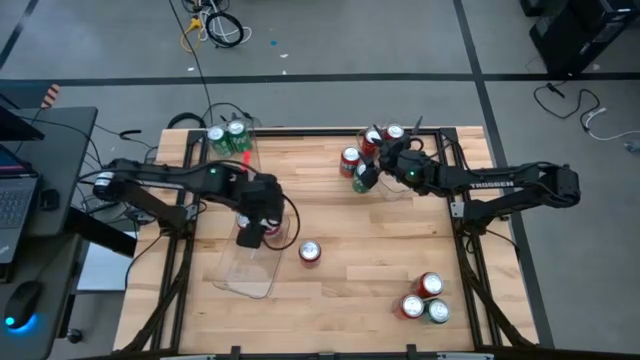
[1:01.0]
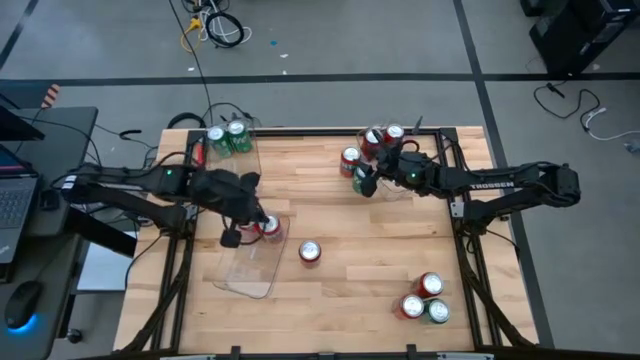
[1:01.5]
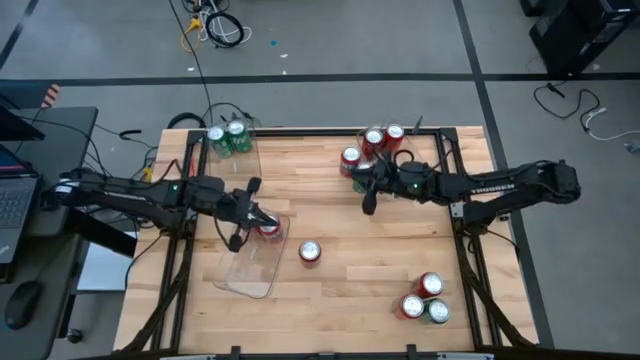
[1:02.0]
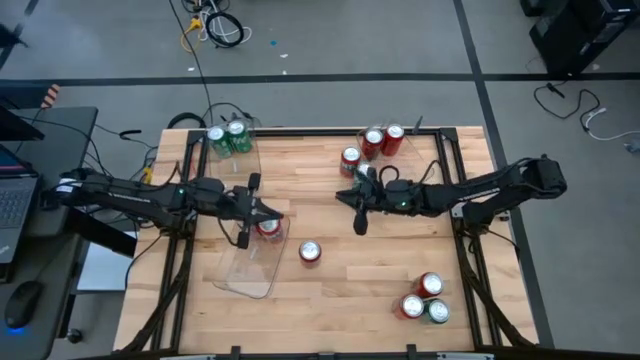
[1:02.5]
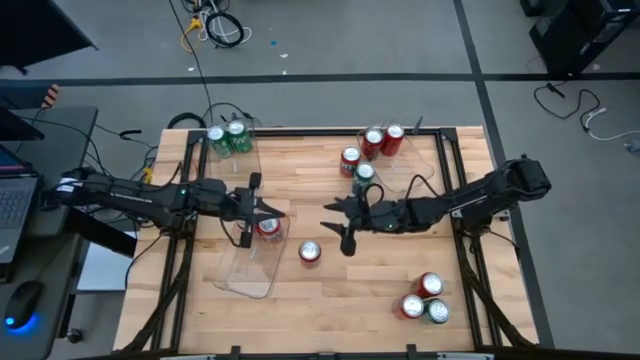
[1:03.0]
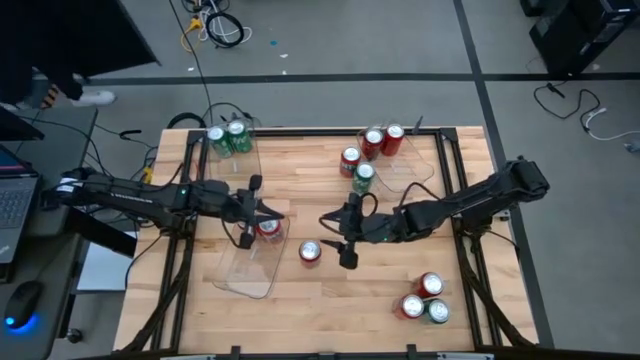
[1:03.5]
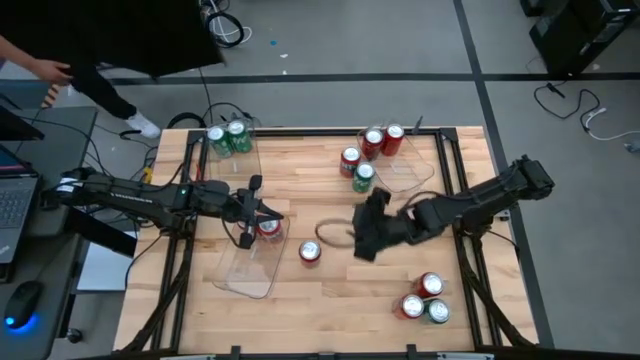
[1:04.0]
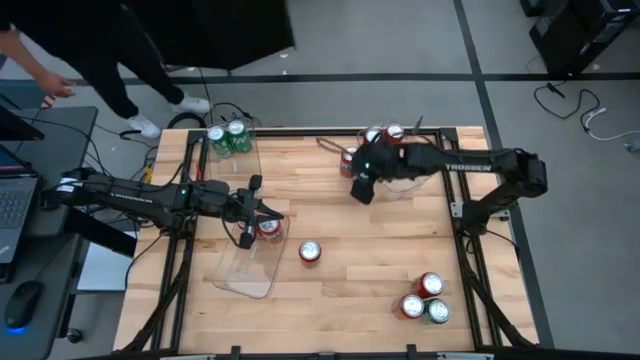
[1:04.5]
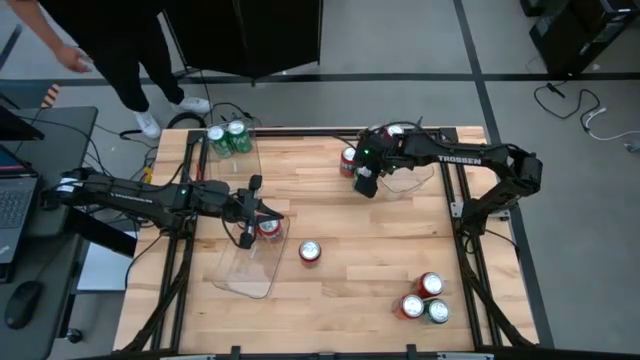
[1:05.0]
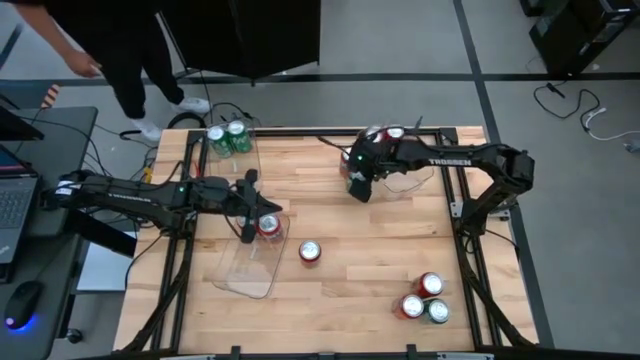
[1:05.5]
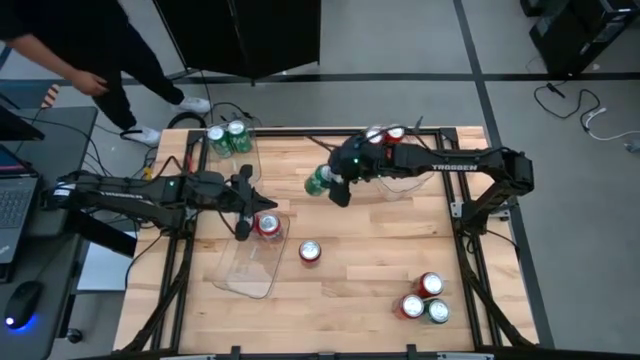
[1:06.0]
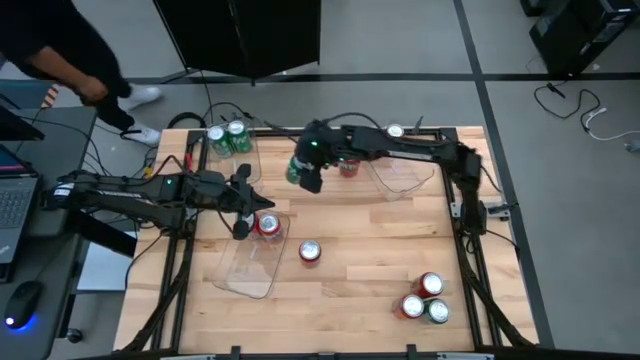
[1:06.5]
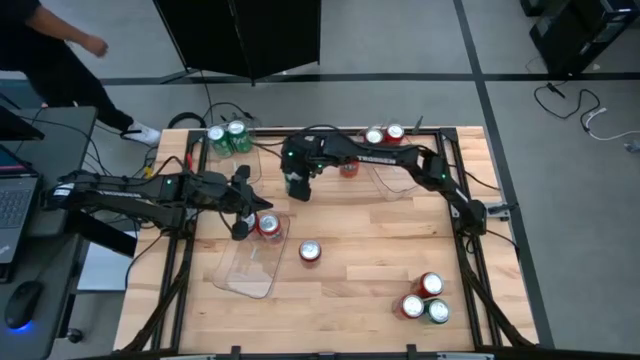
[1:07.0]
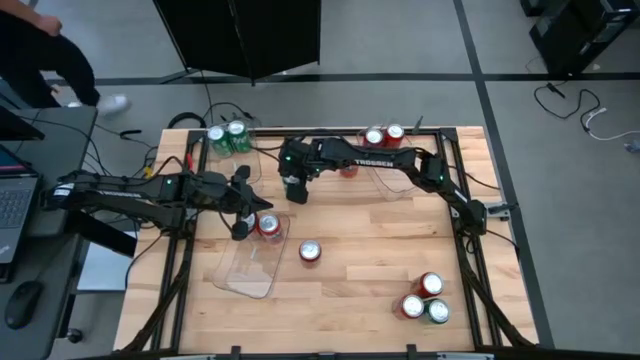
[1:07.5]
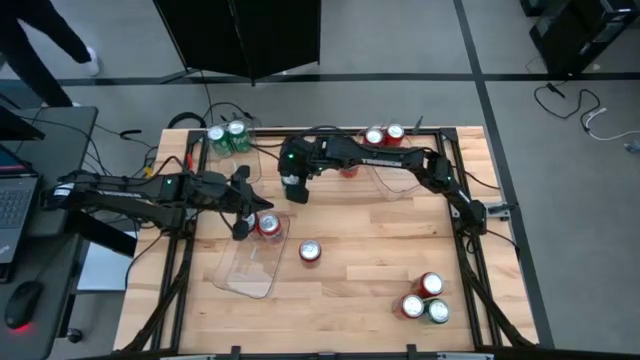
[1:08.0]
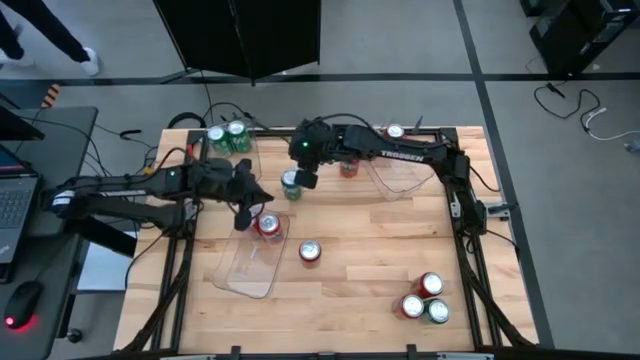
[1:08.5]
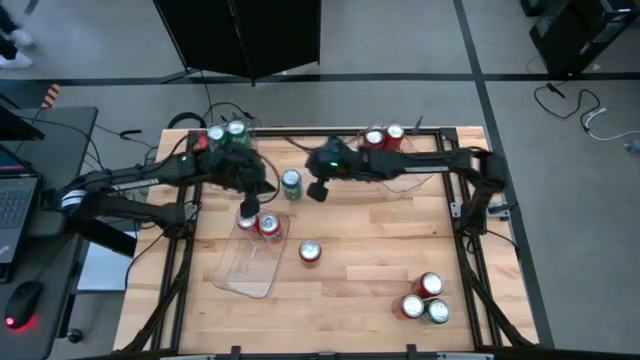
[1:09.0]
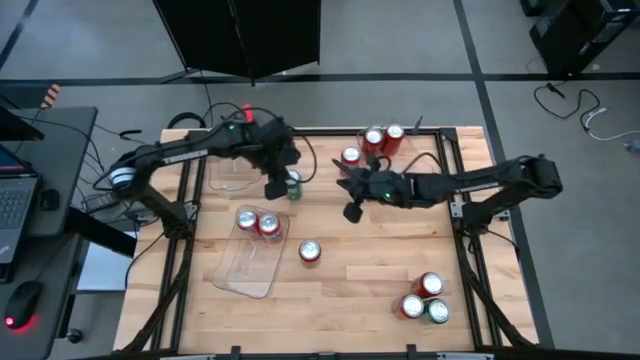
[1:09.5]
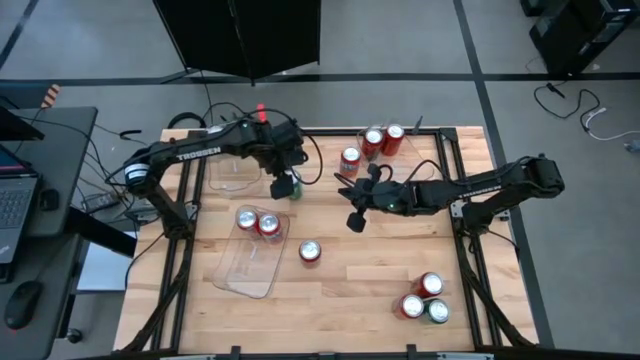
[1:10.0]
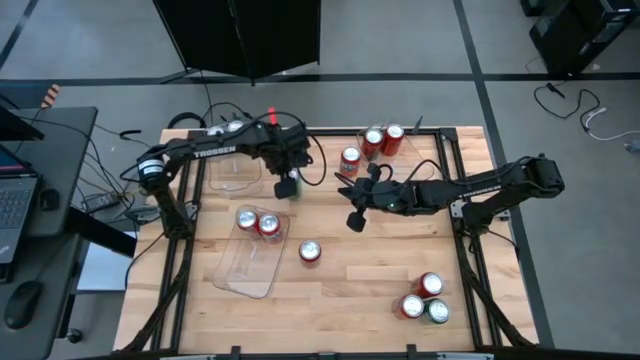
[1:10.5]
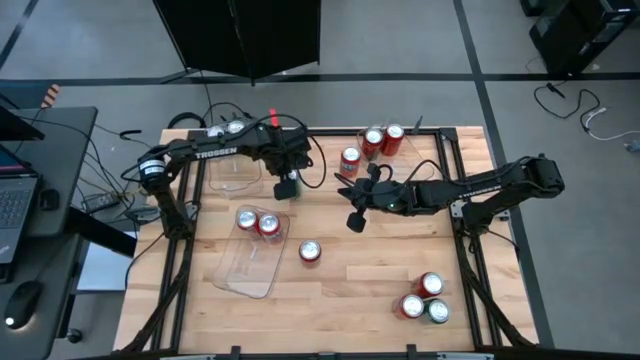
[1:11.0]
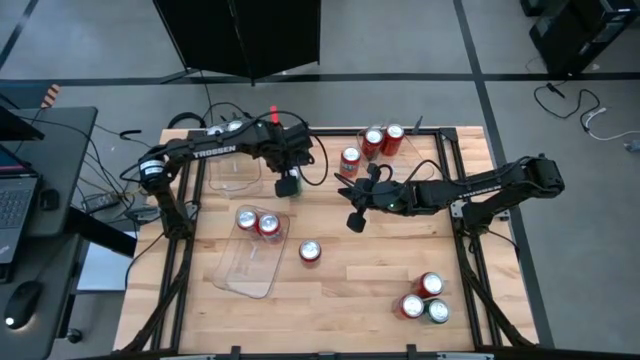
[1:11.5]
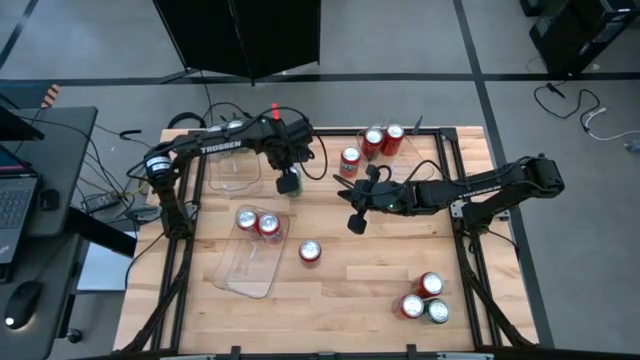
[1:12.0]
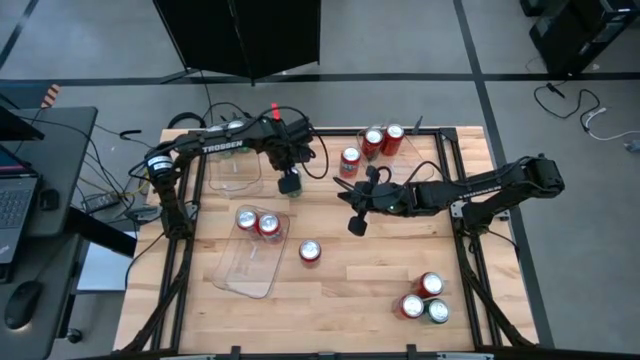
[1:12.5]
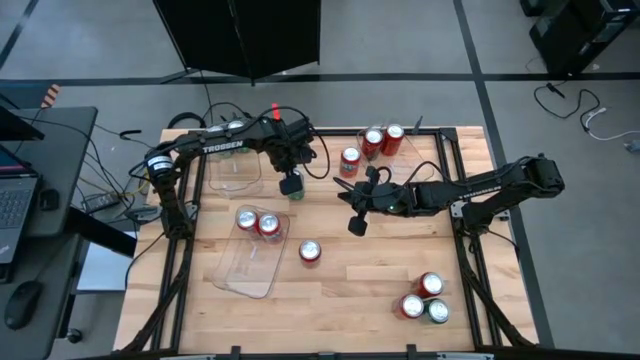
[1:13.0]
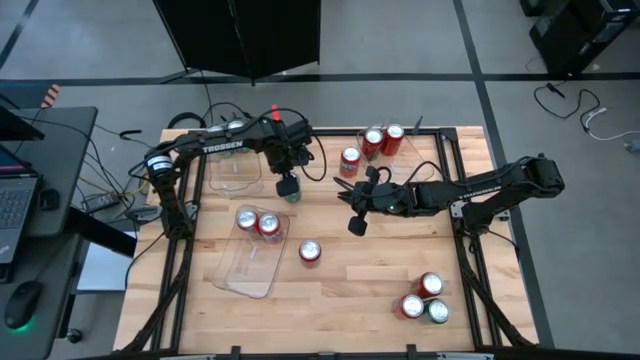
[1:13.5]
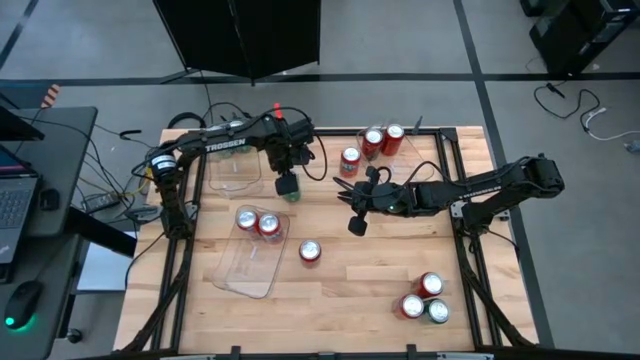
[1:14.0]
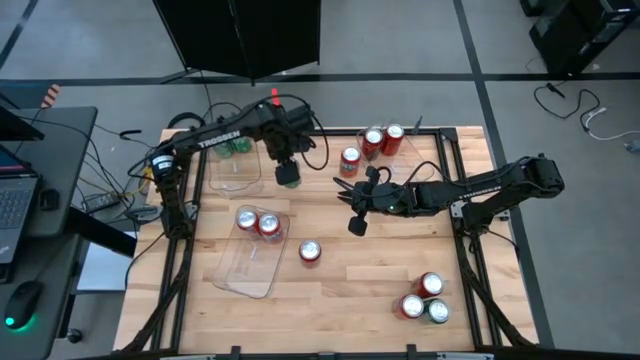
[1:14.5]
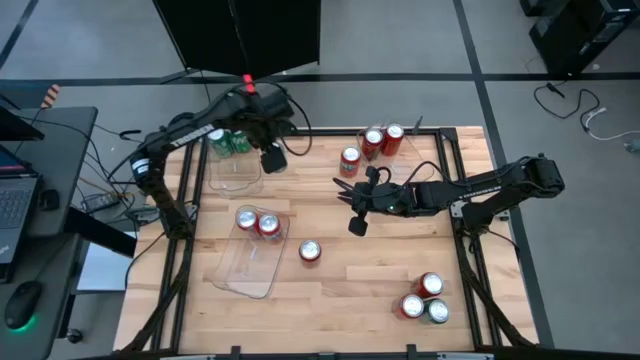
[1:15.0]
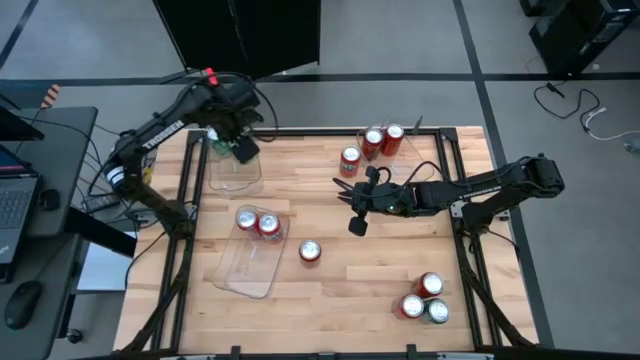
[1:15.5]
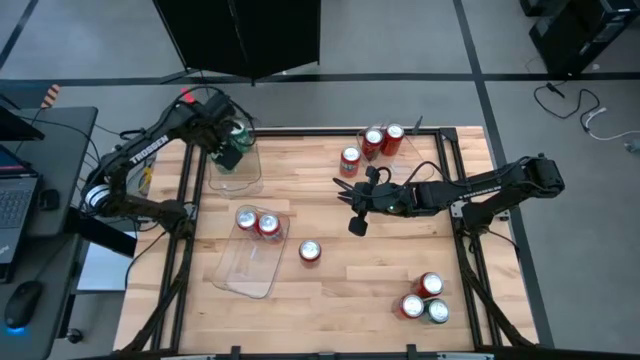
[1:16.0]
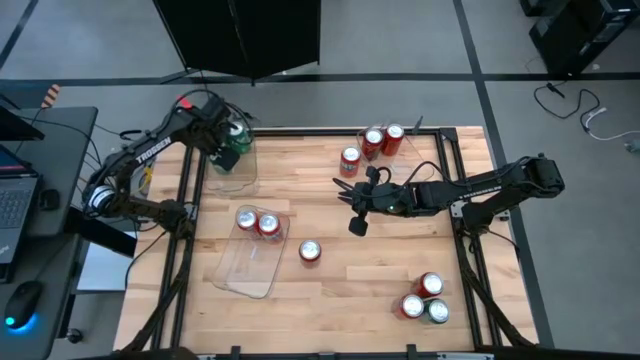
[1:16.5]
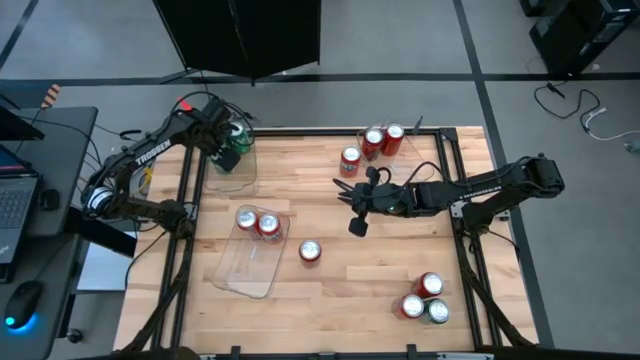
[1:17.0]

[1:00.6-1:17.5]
Task: Sort soda cans
Put the top green soda can into the top left transparent bin

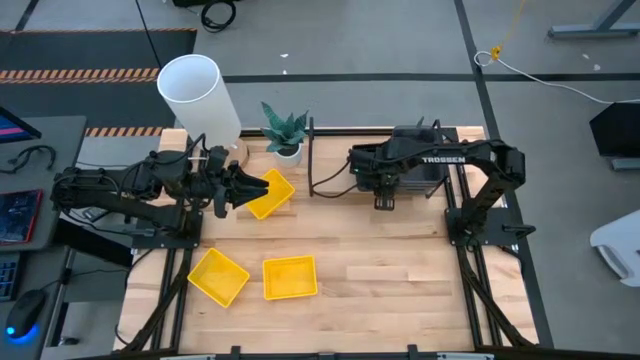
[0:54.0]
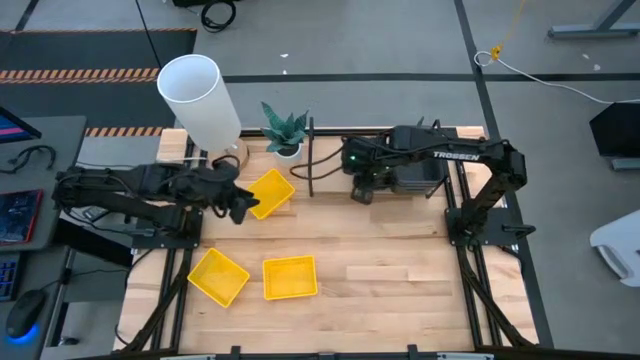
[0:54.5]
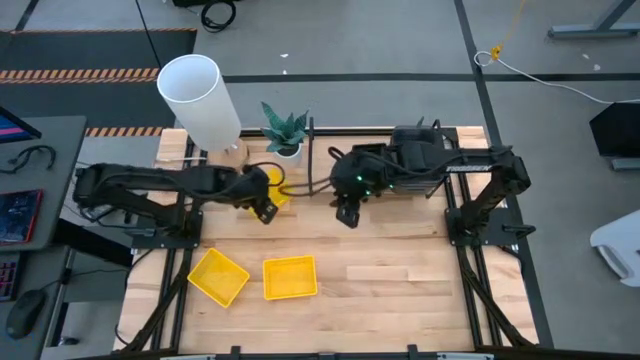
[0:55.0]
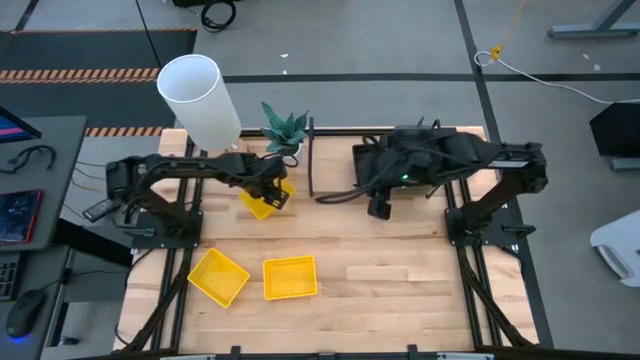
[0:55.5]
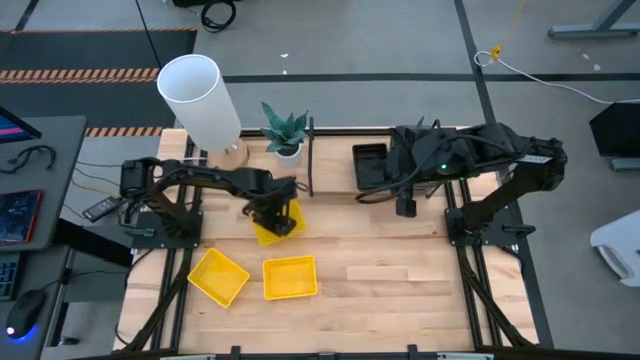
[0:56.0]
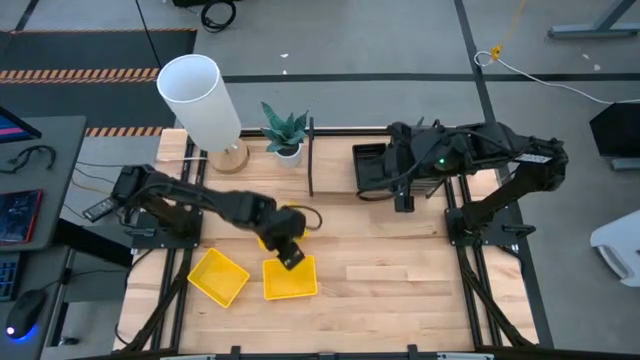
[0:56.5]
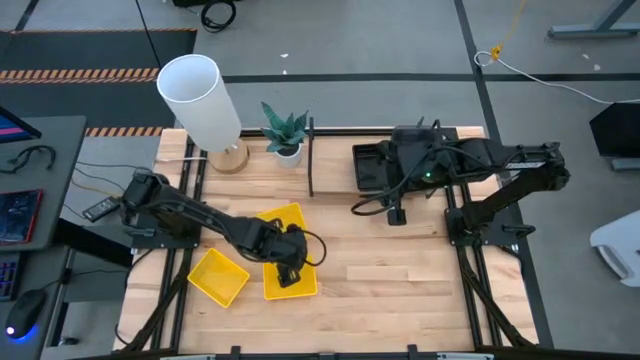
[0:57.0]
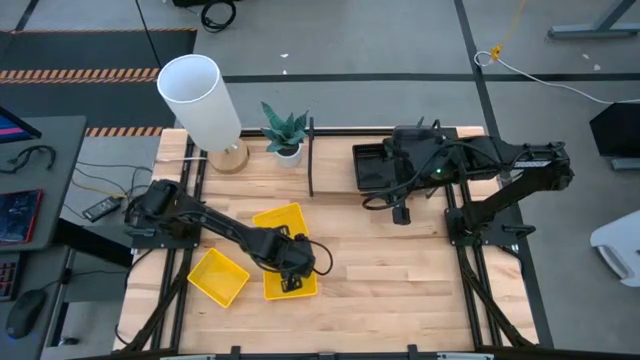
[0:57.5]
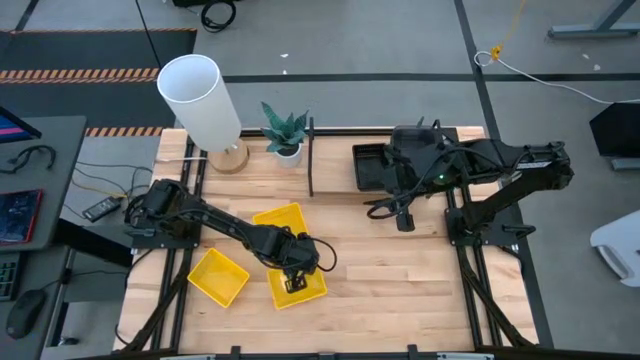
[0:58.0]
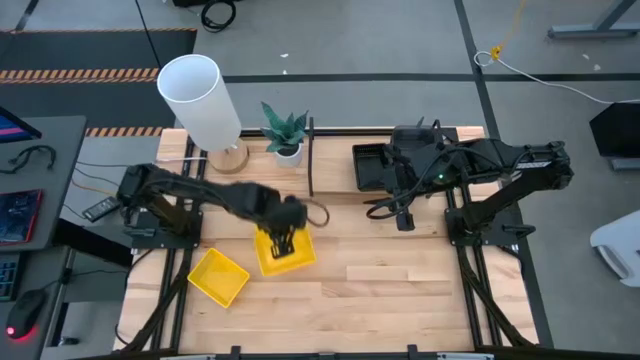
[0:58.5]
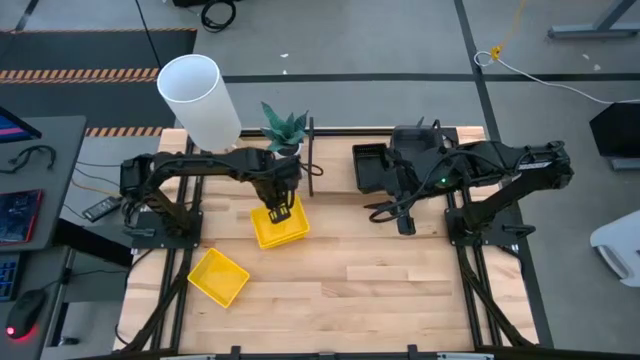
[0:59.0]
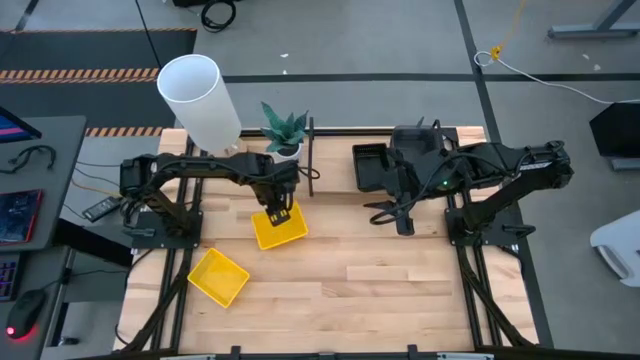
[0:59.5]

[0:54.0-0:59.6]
Task: Stack baskets on shelf by color
Stack the bottom right yellow basket on the top of the yellow basket
